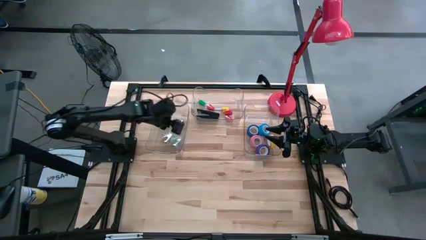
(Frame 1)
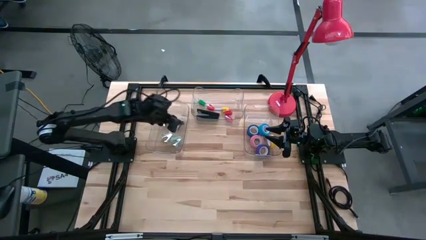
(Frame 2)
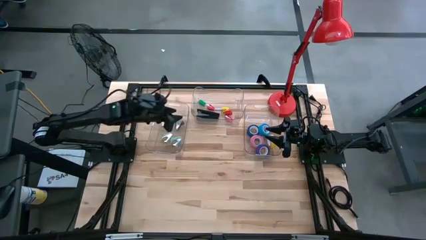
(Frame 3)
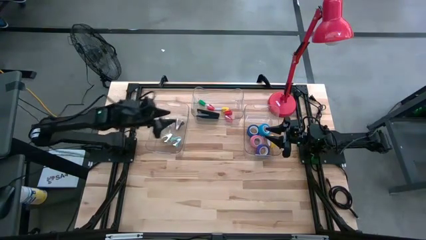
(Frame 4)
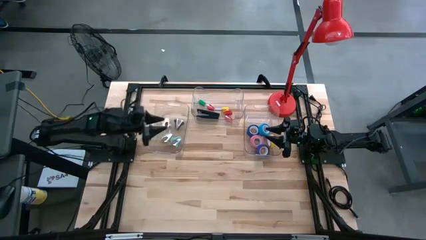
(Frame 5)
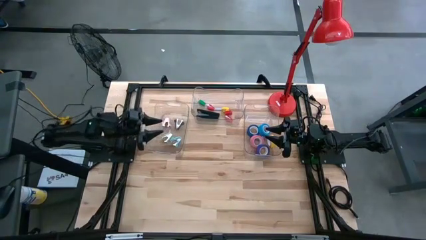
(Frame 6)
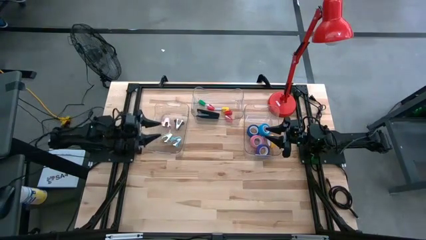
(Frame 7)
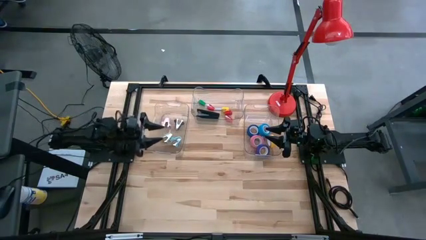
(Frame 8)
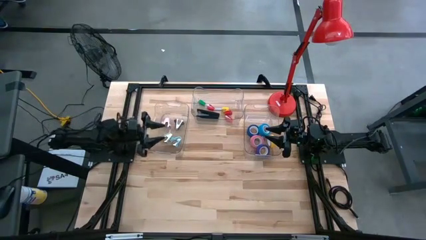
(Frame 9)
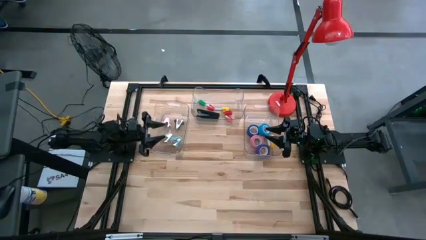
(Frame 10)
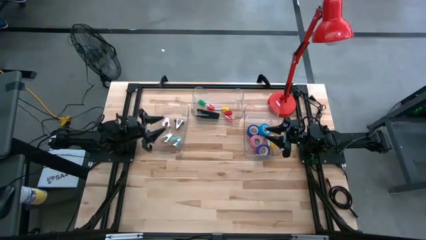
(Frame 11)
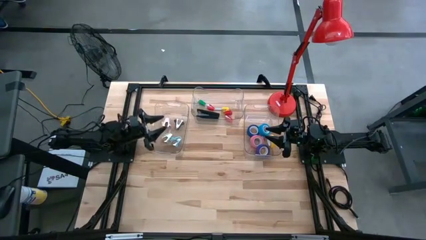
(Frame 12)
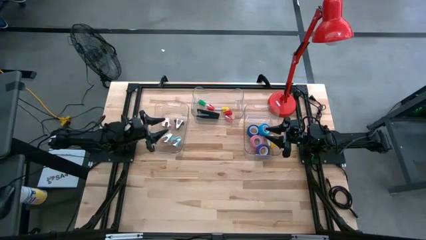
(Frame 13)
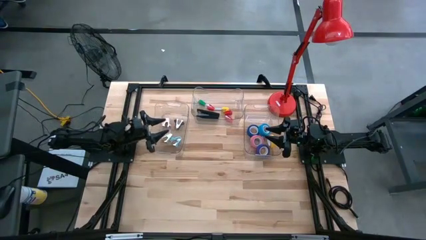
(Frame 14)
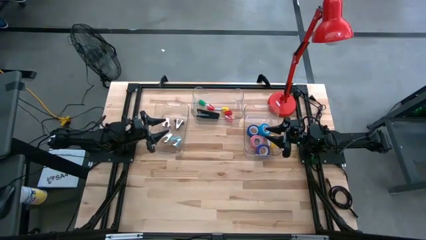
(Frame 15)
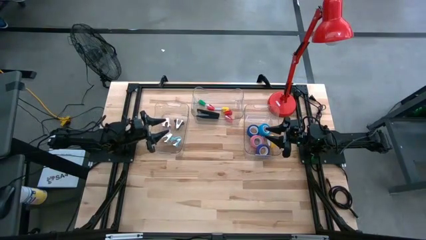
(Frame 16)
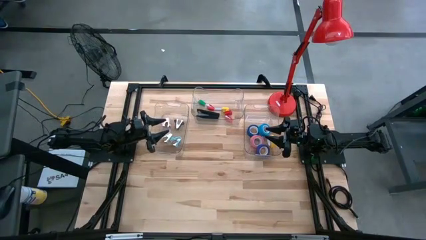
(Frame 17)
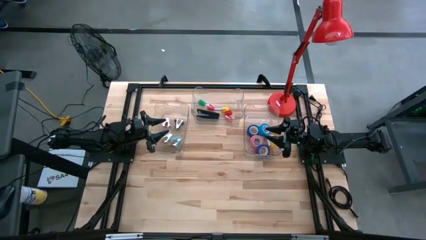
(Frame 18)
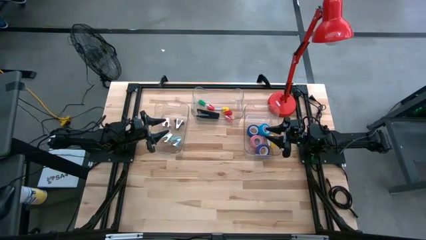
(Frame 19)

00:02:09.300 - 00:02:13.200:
Task: Pick and place Stapler, Stapler remover, tape
Return to Home Position

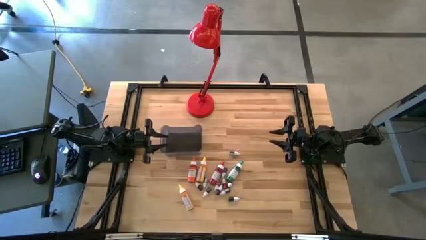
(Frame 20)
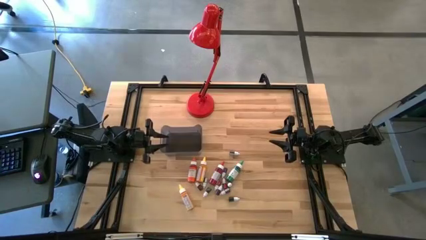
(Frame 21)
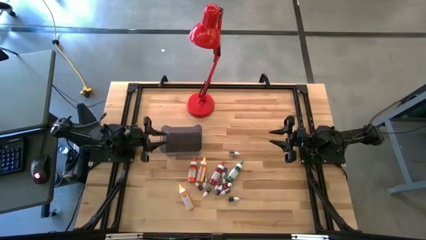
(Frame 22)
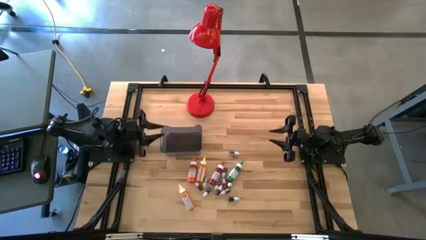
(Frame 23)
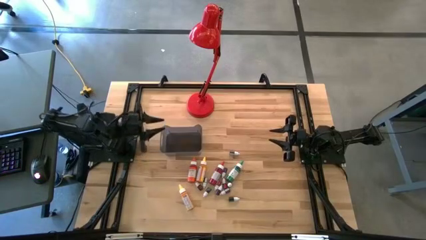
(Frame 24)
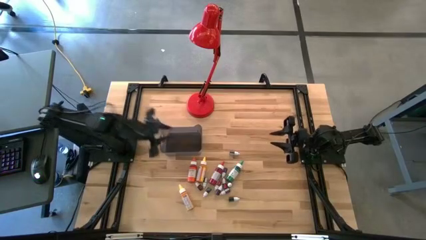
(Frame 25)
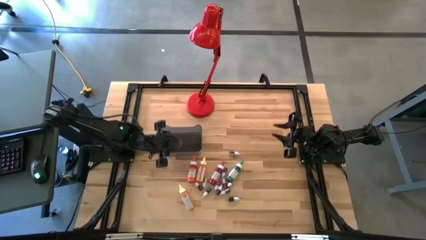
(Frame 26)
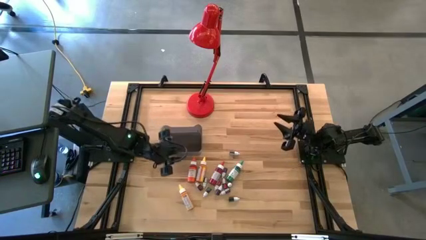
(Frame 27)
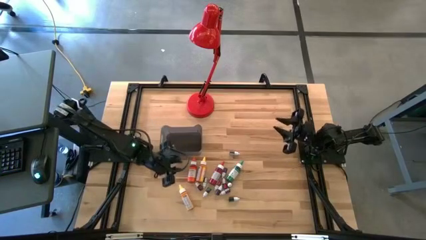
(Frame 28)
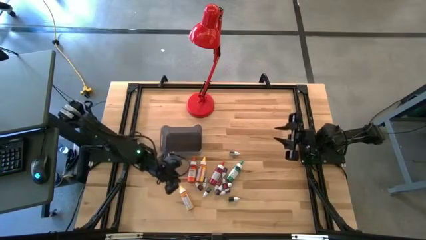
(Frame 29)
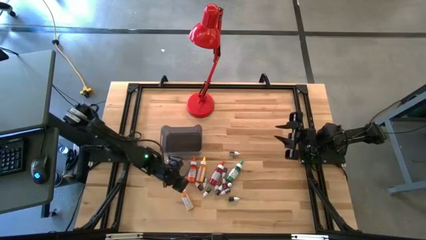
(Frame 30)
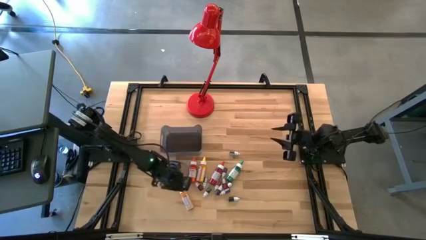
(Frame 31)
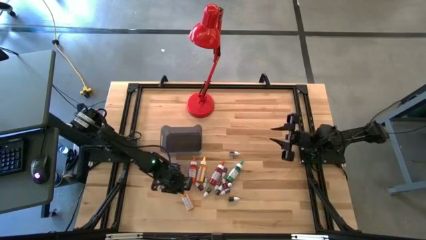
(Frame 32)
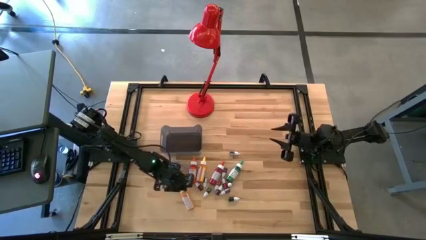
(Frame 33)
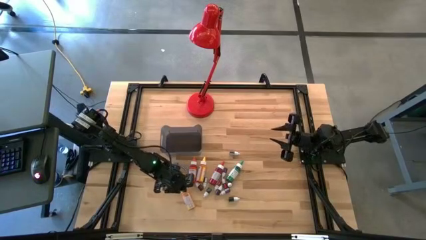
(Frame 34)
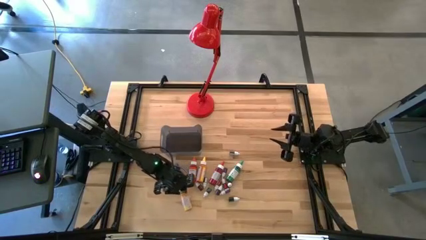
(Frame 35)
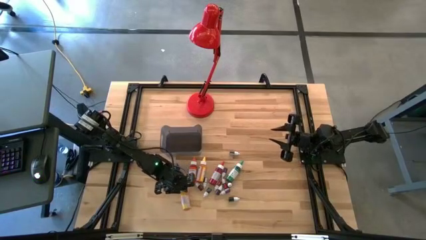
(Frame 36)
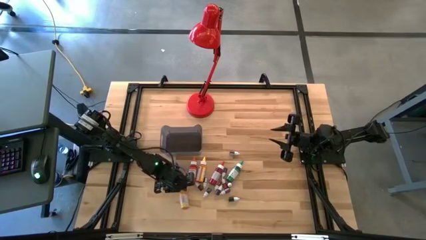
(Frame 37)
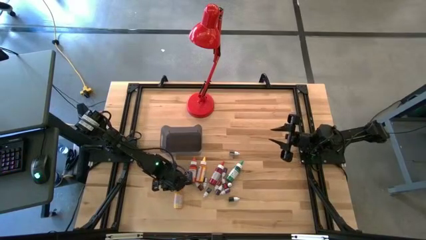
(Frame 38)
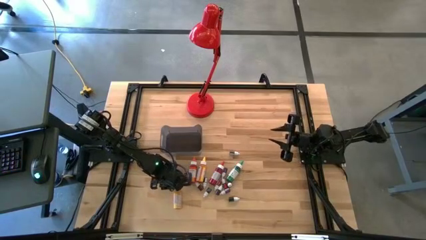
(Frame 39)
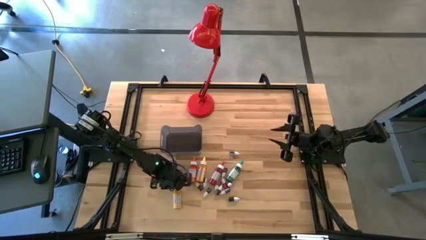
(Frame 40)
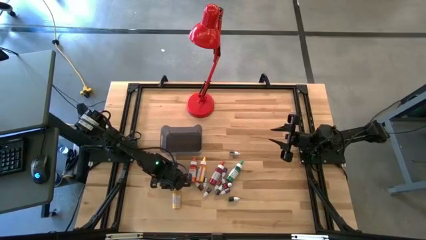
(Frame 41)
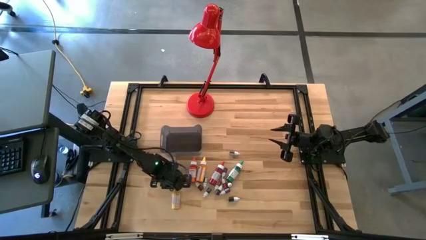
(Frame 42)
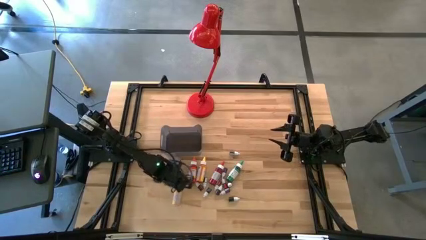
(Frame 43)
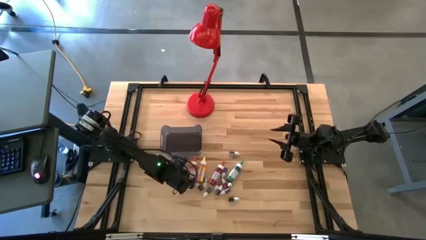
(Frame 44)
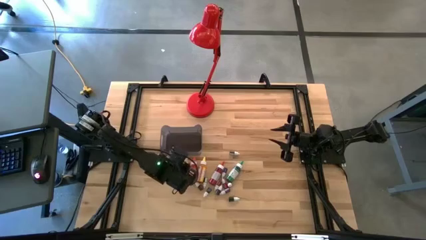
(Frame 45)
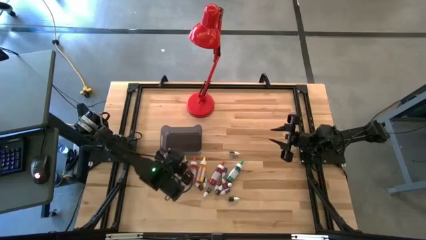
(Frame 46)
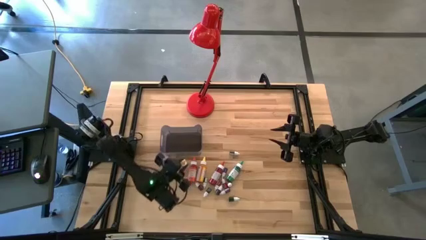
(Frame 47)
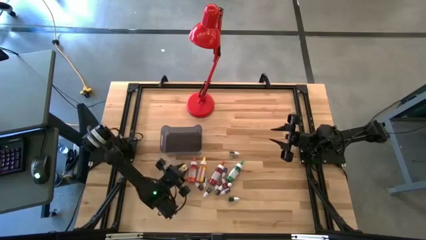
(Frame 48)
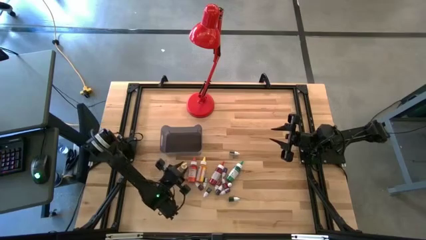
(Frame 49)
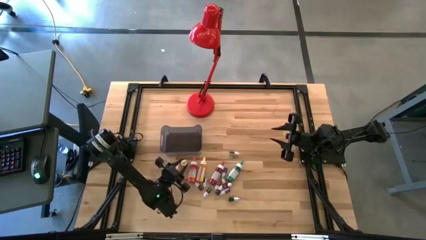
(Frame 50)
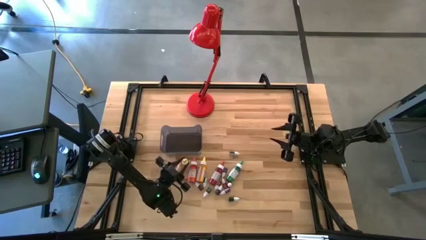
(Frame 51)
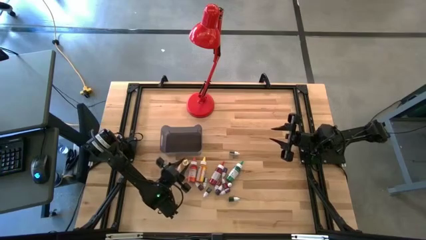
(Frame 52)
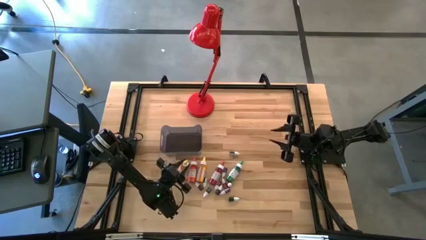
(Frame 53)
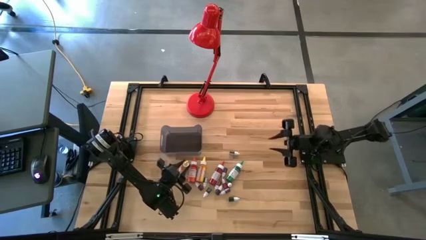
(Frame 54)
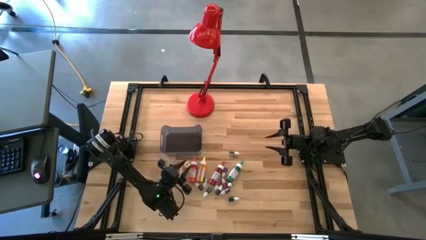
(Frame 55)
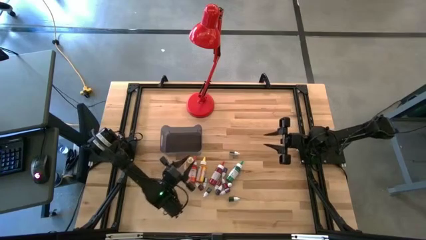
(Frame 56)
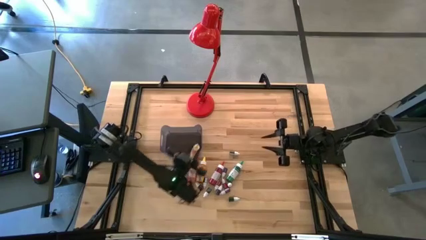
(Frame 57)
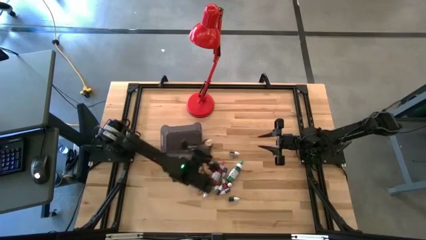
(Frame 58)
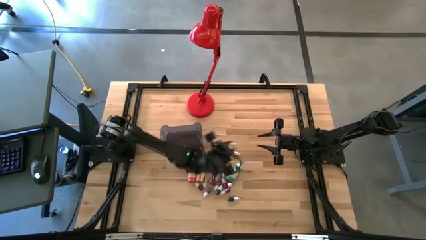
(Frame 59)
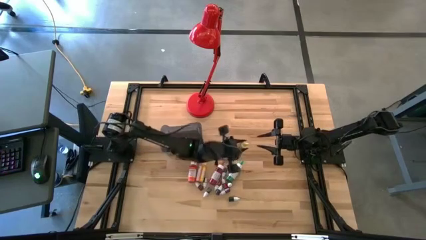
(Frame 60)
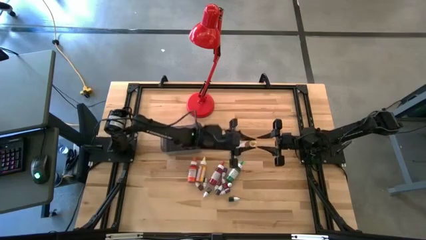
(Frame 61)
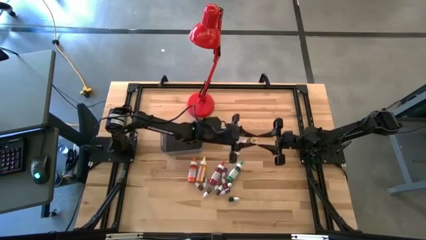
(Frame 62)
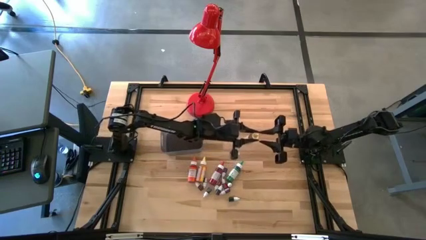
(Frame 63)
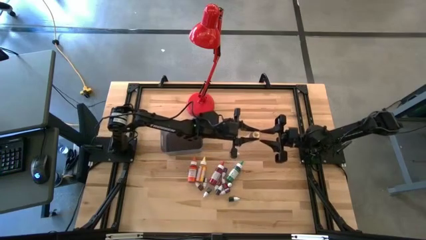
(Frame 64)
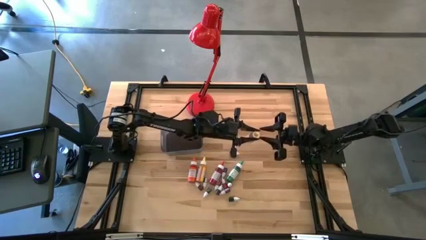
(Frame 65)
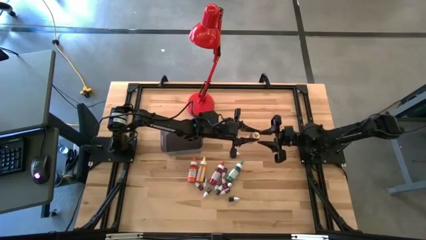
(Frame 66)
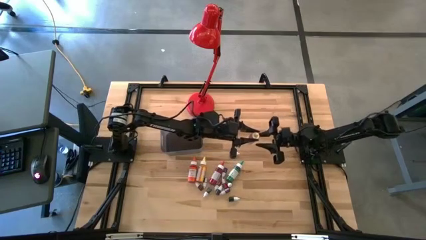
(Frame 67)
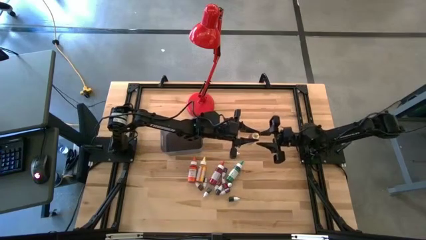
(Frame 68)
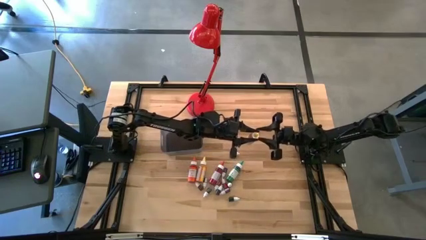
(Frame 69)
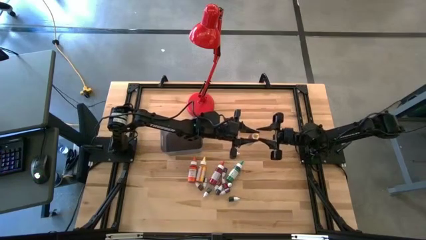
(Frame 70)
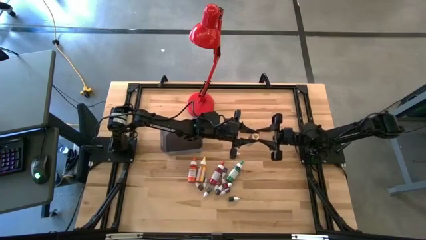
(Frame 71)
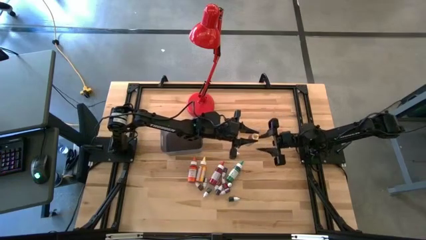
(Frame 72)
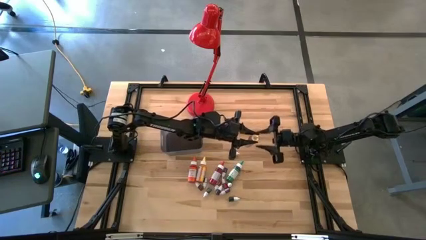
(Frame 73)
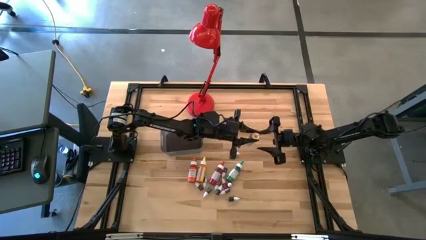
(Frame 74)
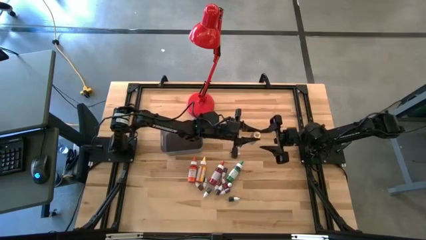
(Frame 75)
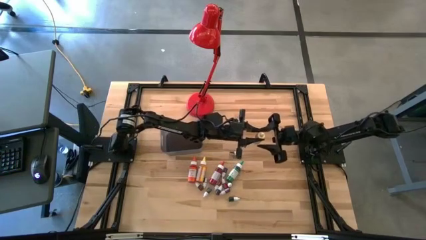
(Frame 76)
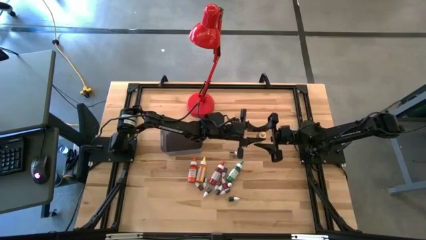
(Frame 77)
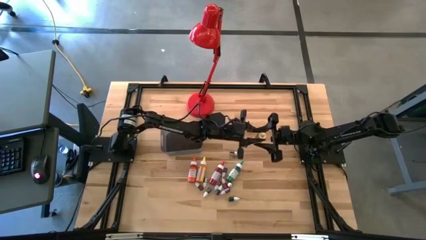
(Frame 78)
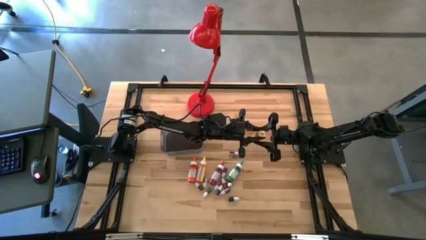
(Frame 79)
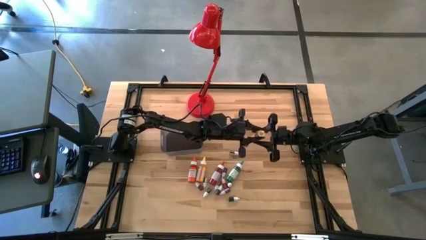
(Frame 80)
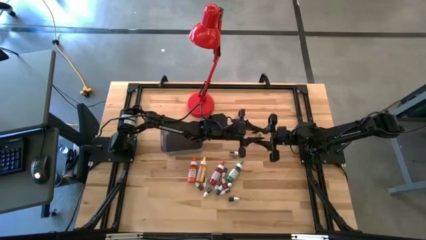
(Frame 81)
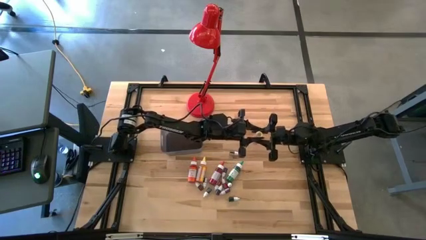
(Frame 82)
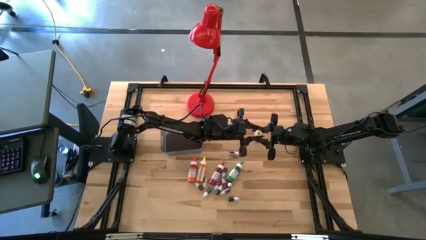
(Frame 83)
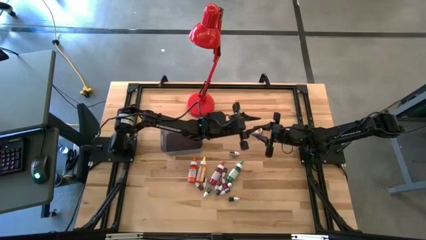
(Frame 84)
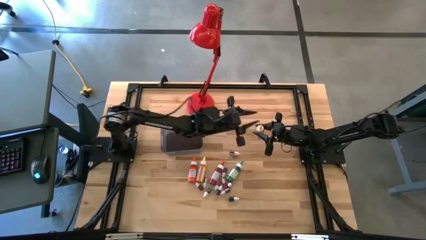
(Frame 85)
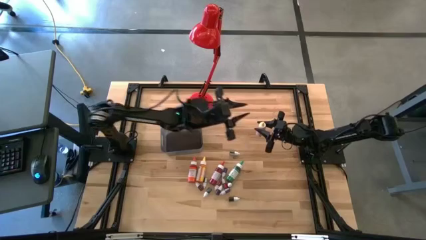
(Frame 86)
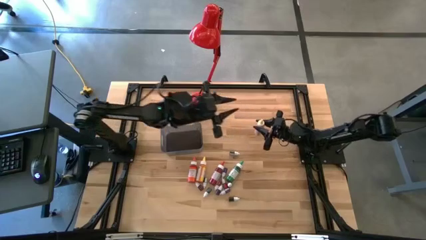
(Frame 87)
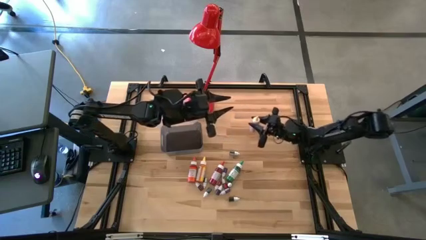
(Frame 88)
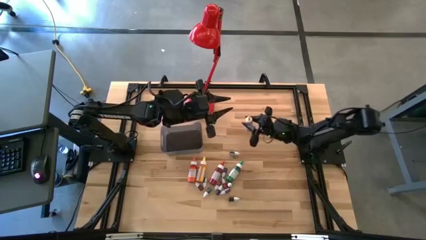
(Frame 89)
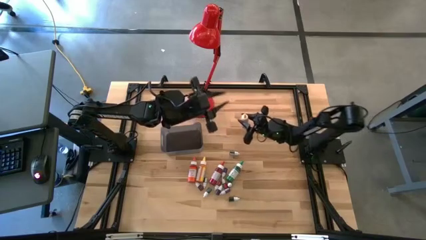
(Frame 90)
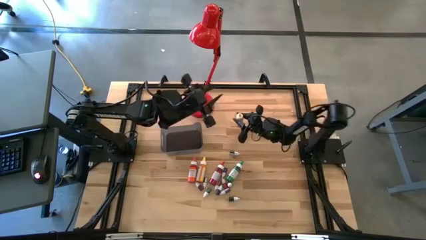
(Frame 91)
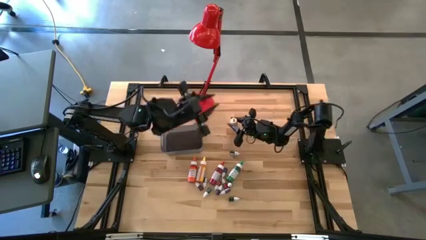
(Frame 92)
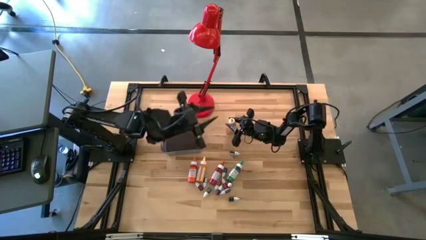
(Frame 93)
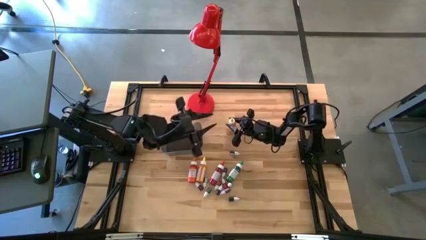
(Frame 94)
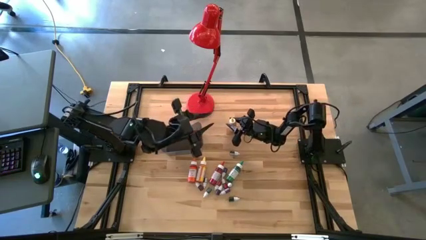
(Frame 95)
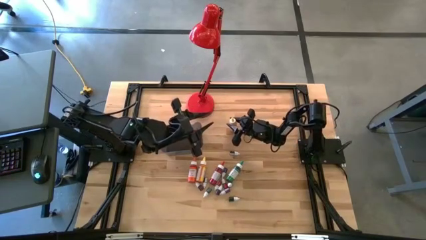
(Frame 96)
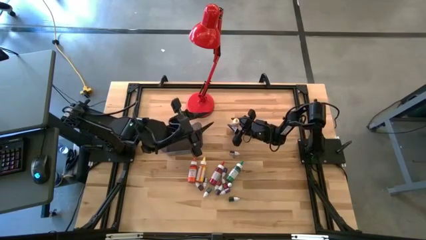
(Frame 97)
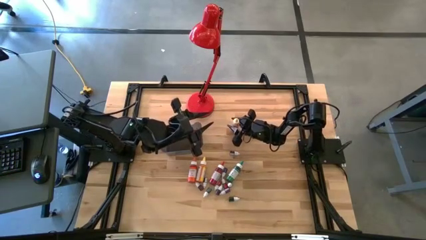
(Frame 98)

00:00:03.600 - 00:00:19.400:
Task: Pick & Place food coloring
Move the large yellow food coloring bottle to the center of the table
